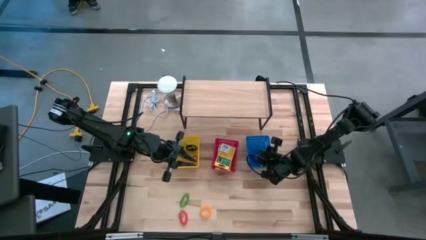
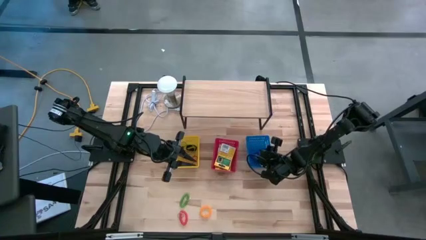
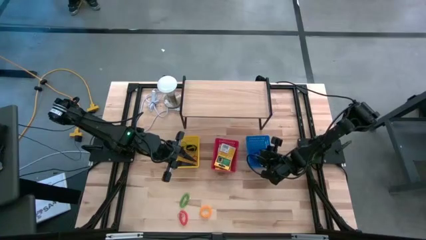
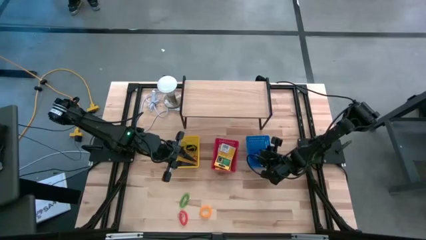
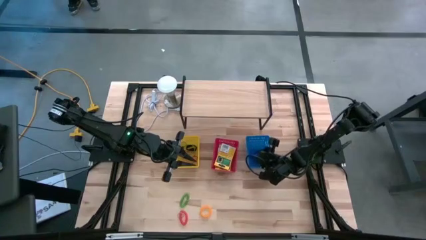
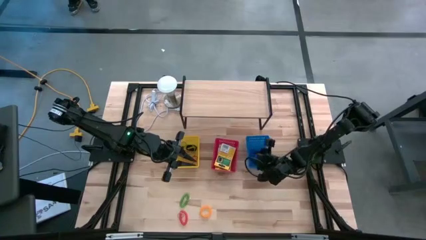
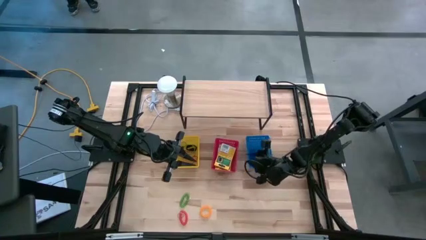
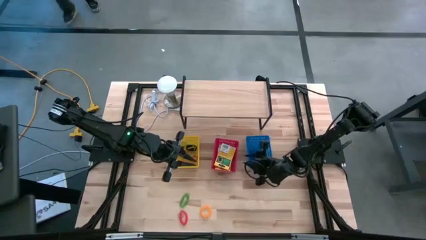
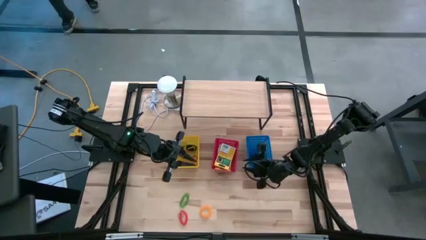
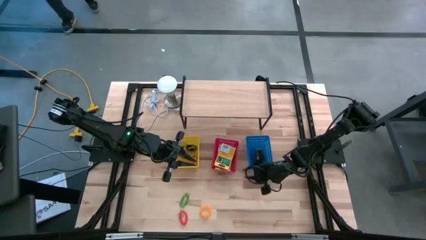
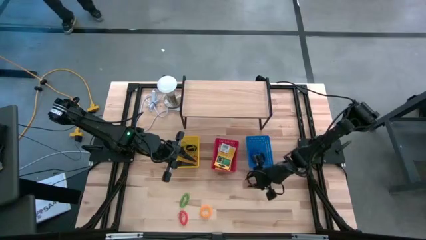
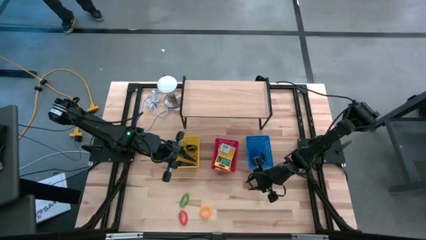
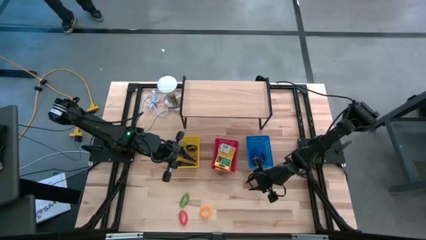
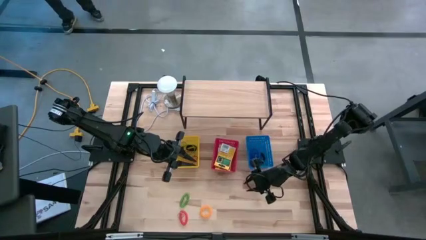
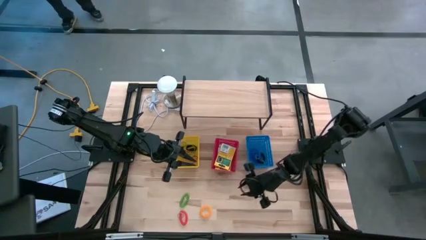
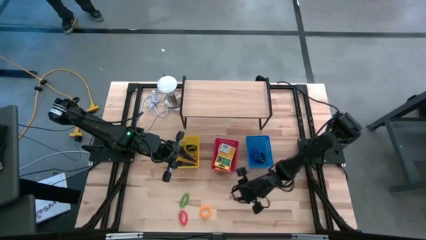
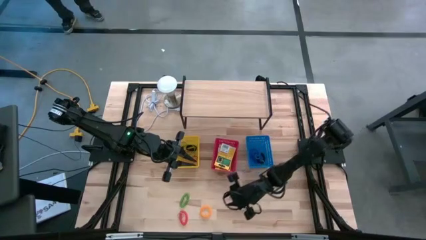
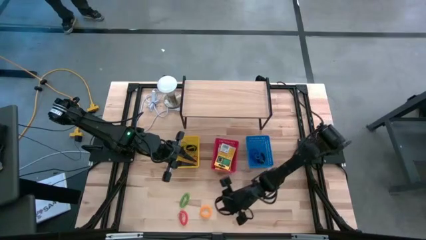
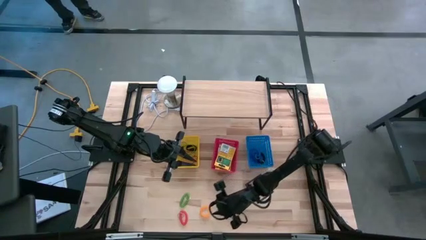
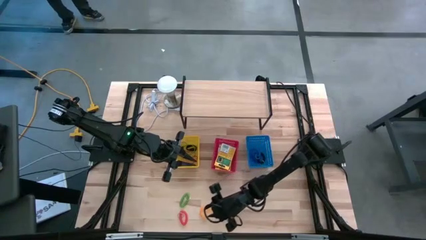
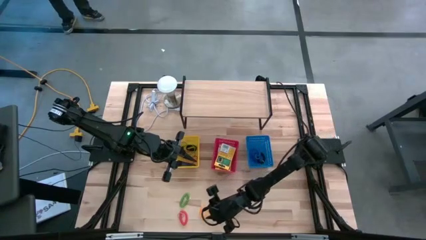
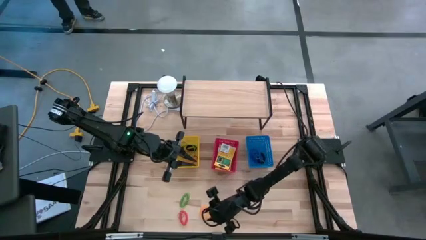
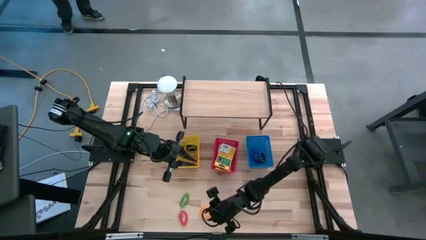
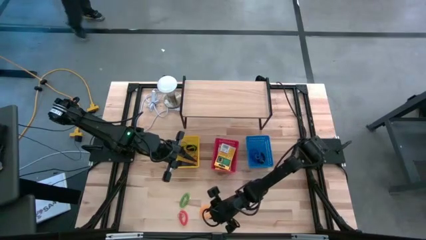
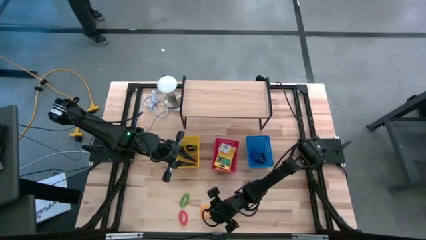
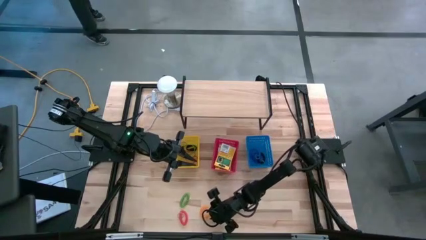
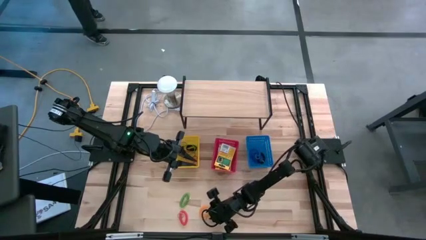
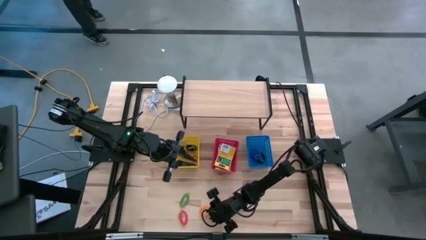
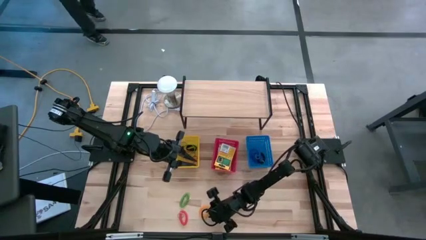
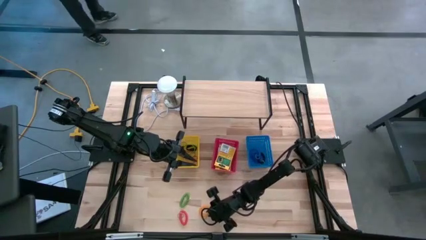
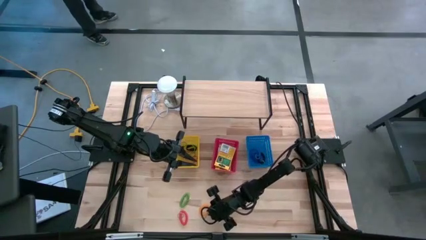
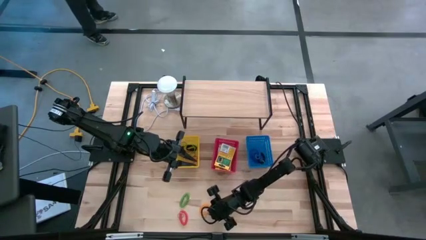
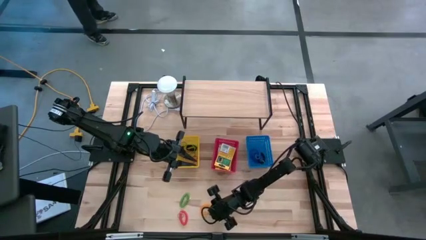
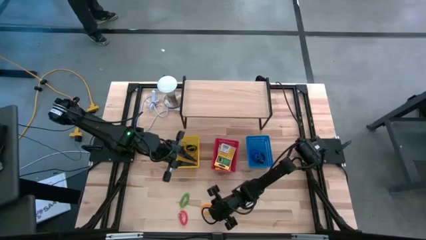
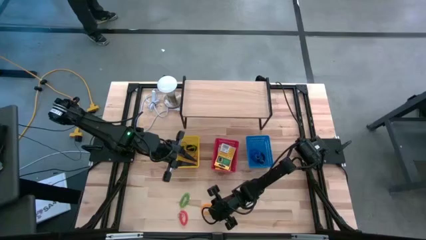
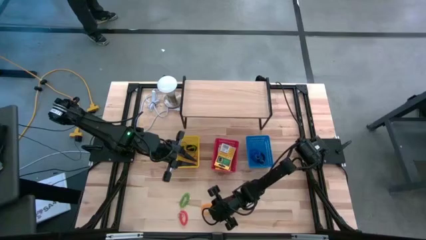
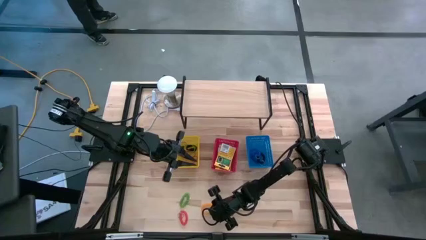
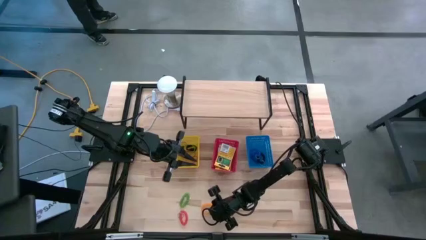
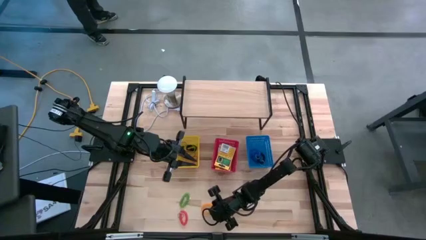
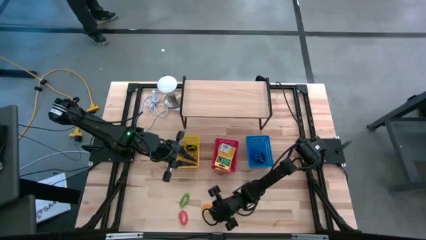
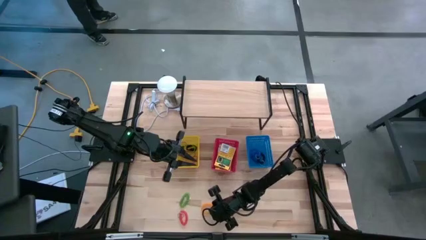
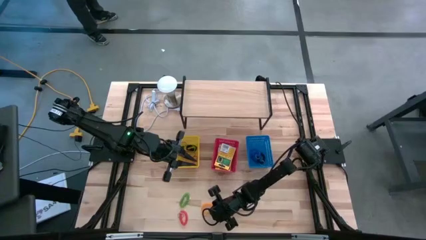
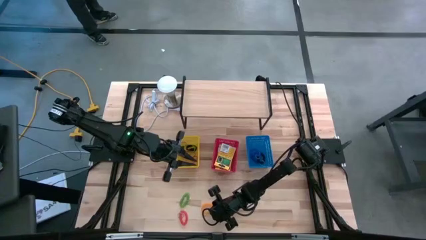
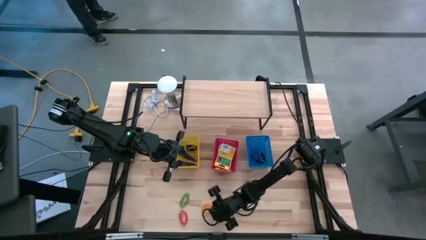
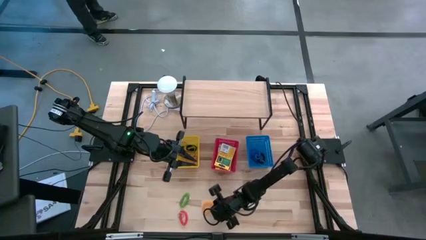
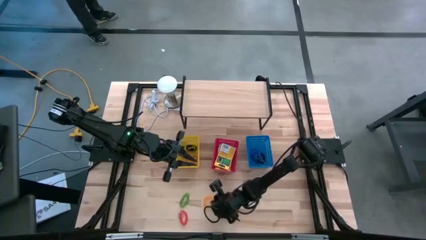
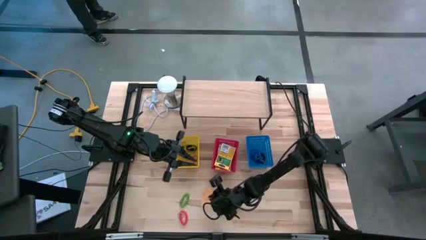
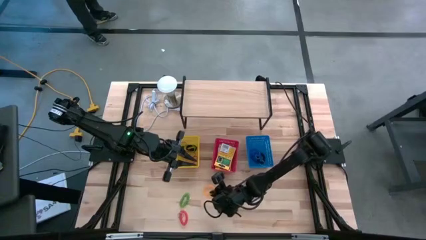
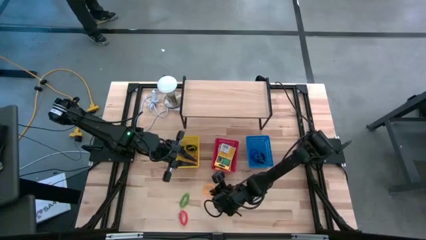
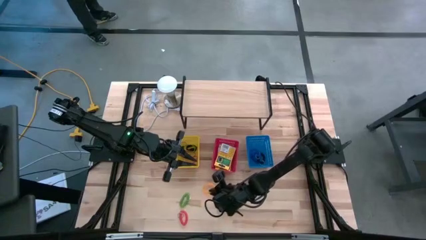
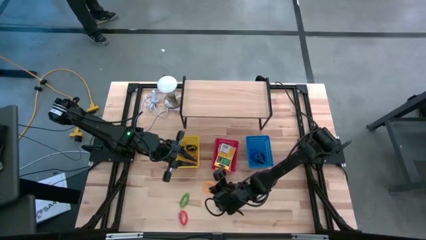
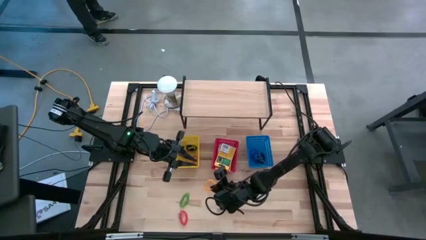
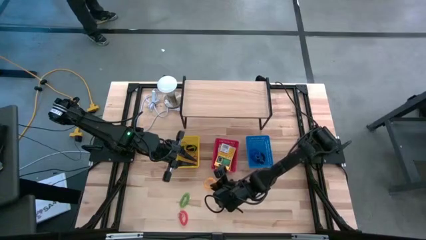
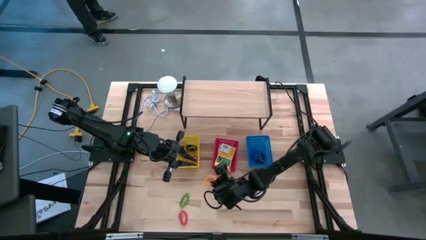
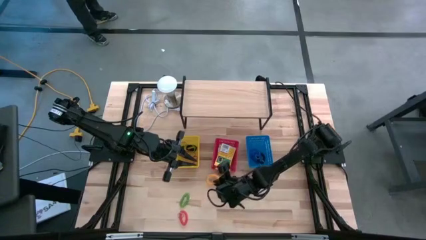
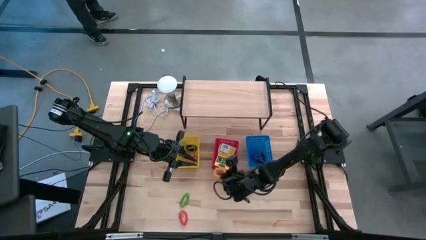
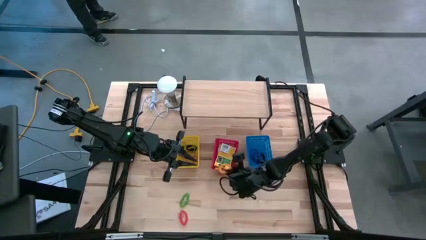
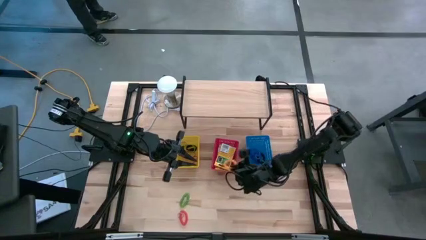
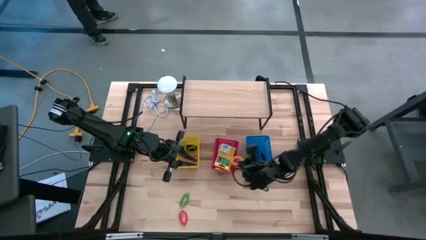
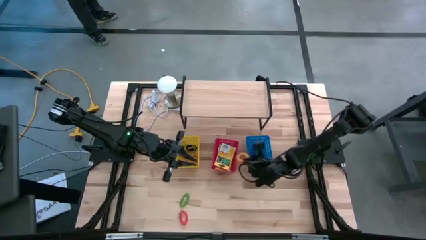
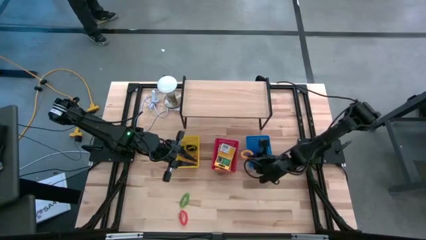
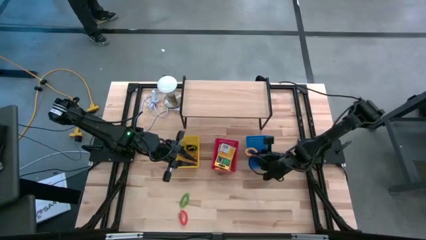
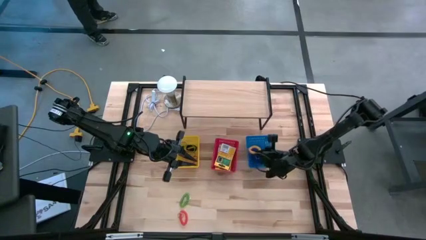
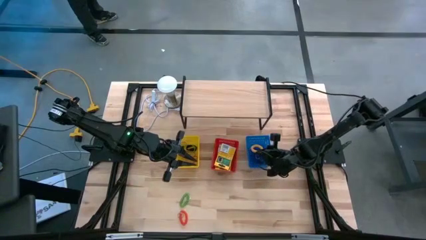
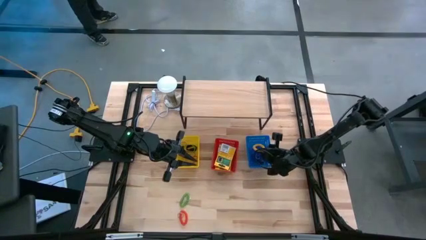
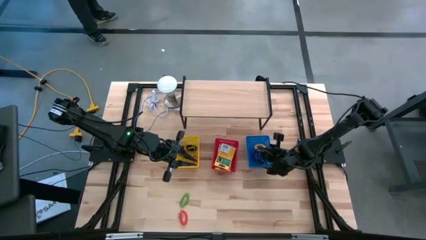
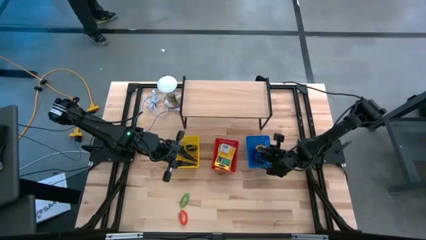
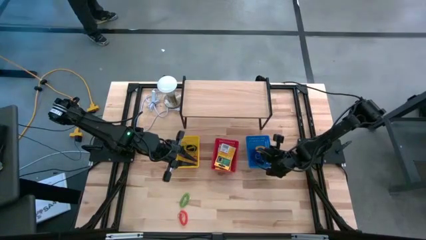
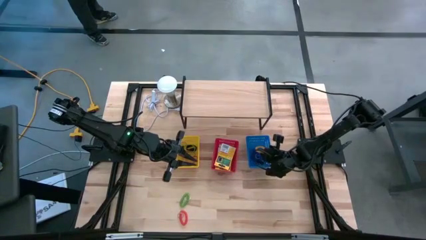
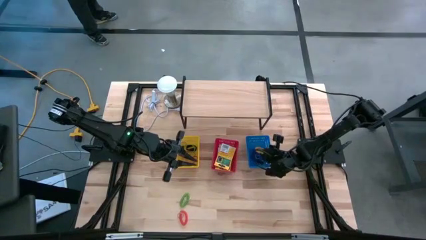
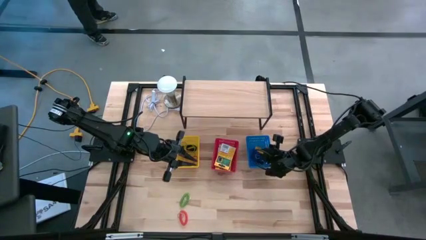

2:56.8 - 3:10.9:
Task: Pick & Place Office Desk Supplies
Put the yellow spiral keychain into the blue bin
